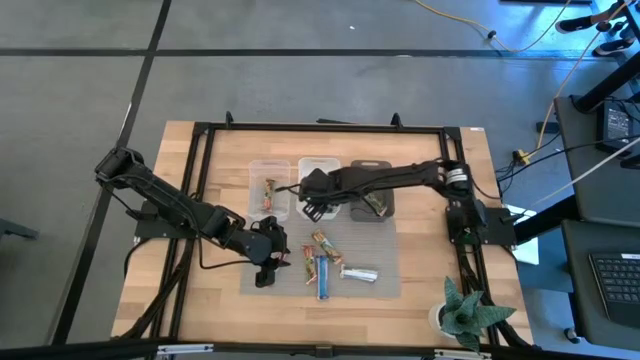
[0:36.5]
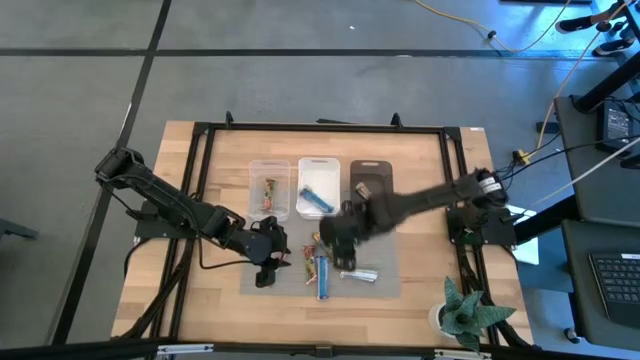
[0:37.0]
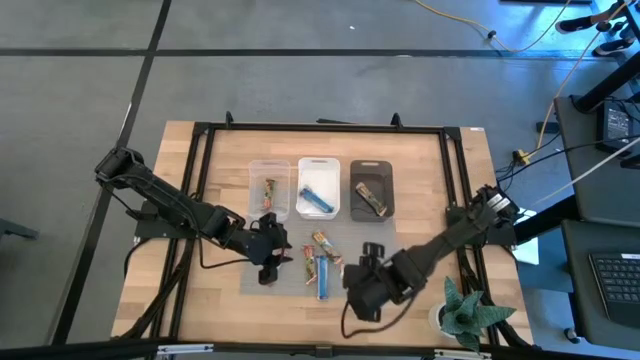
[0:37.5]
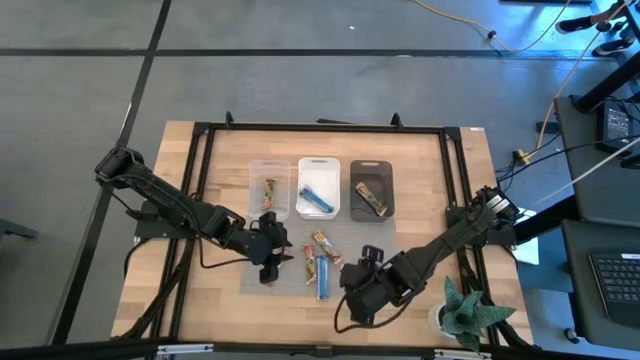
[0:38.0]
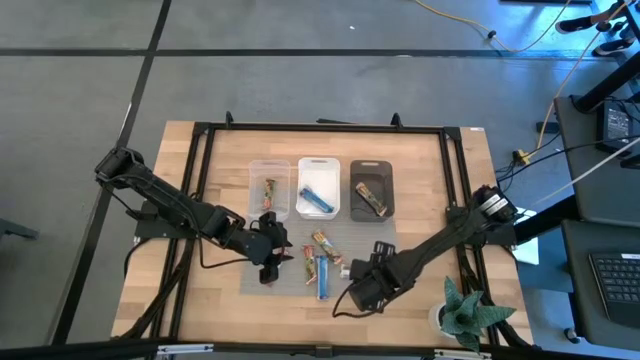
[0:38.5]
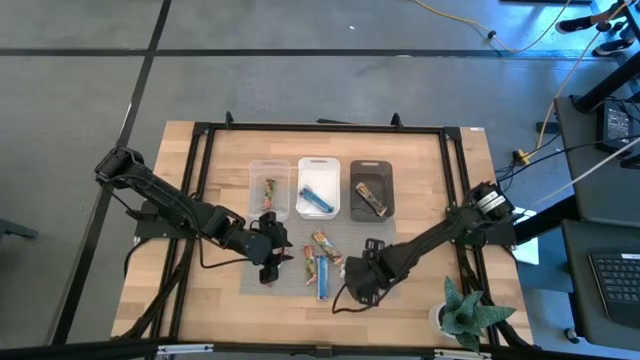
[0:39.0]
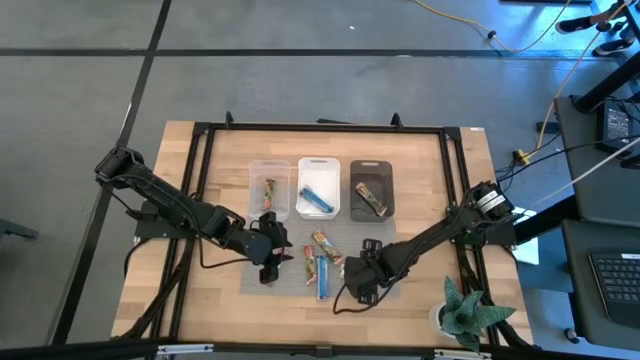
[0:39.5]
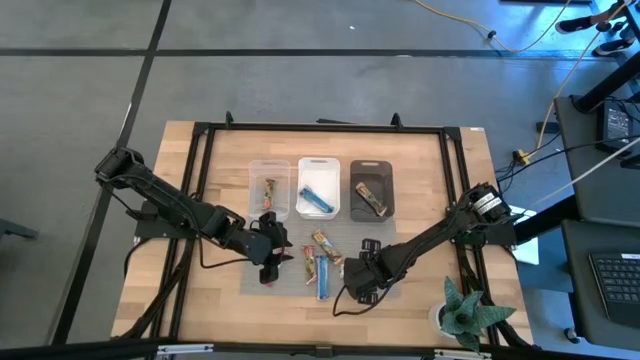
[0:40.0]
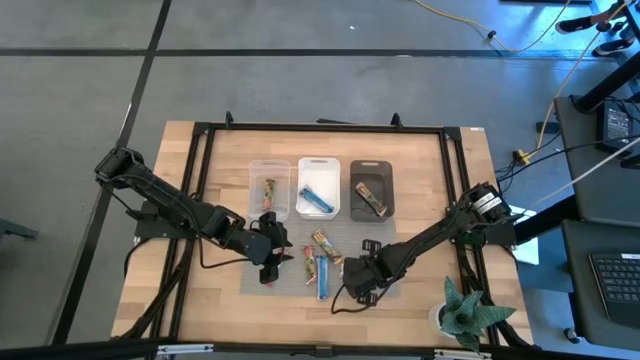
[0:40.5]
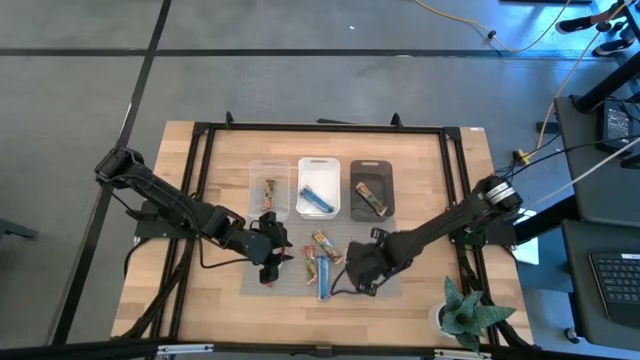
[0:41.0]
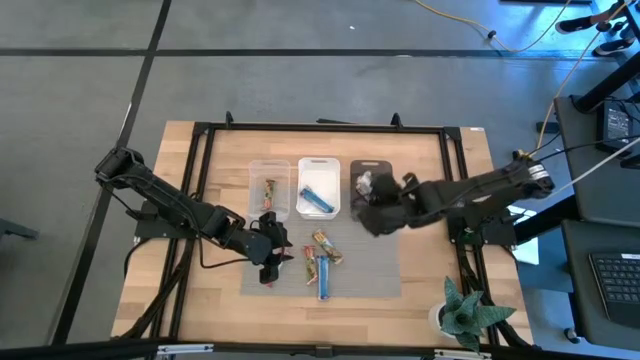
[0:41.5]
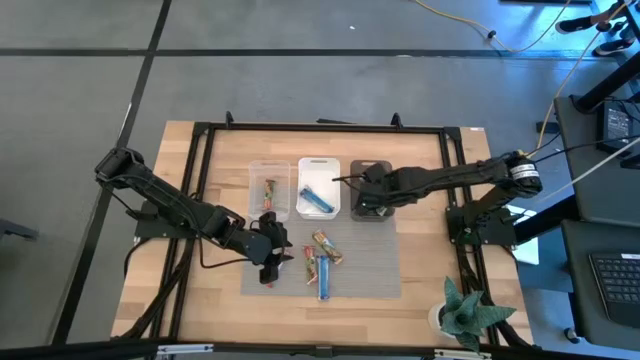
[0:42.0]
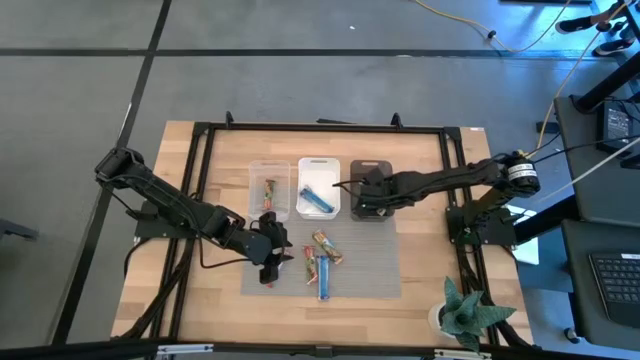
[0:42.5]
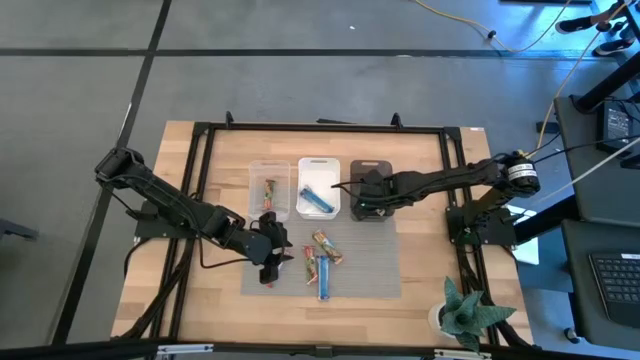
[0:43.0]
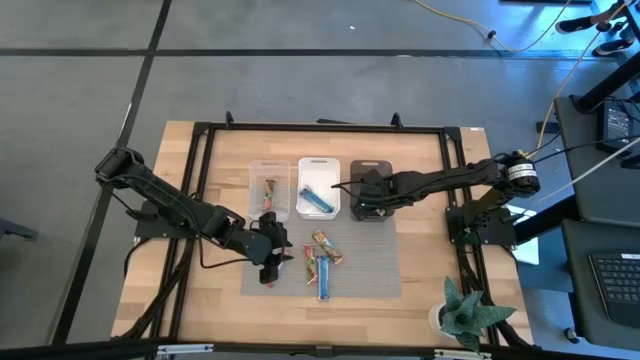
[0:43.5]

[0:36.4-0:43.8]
Task: Pick and place Granola Bars by type
Put the bottom yellow granola bar into the black bin

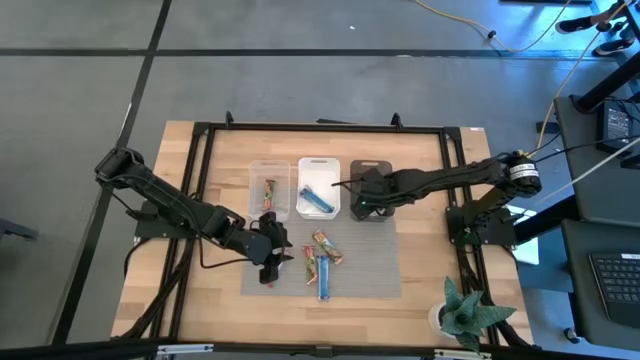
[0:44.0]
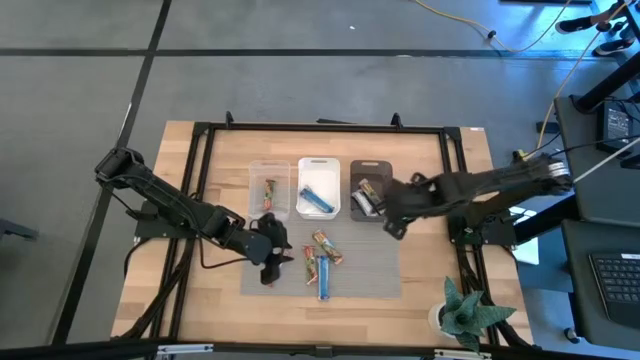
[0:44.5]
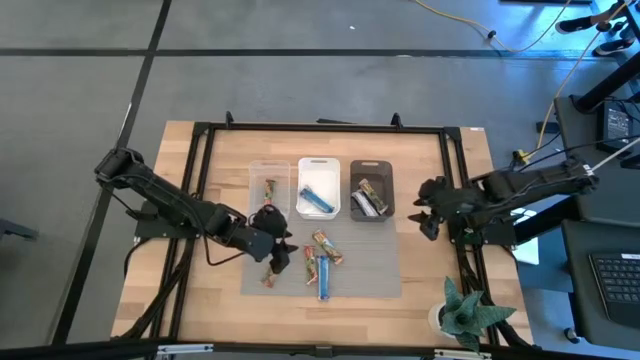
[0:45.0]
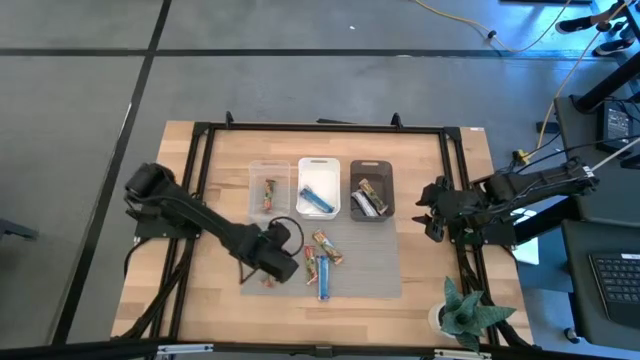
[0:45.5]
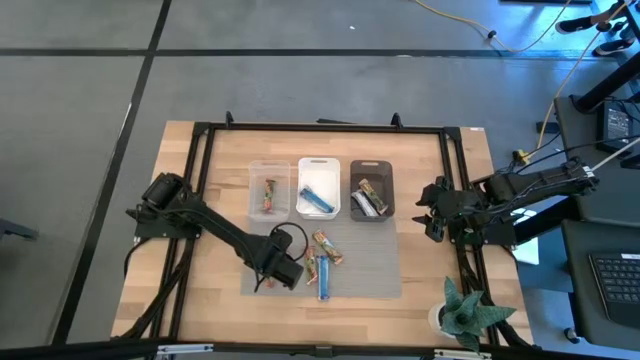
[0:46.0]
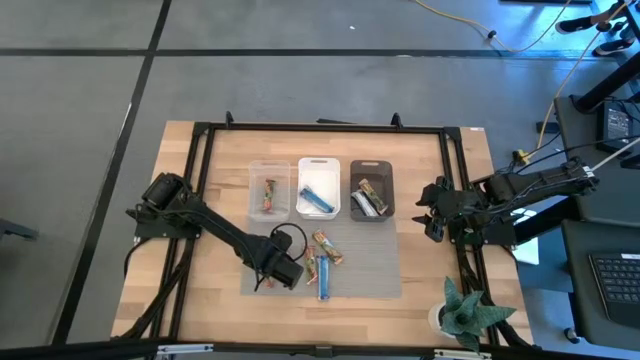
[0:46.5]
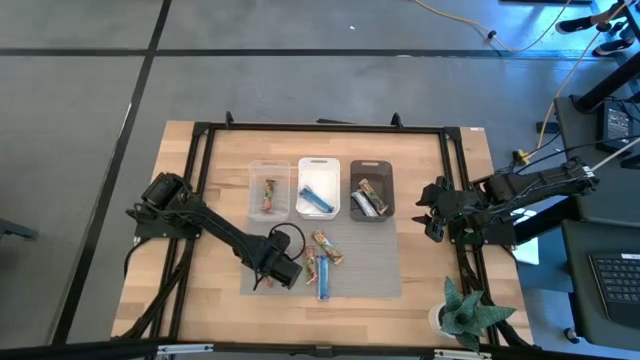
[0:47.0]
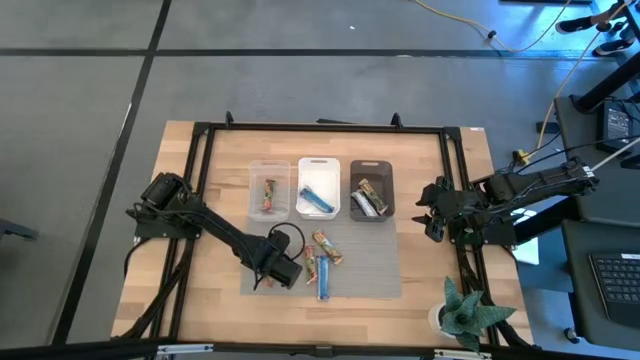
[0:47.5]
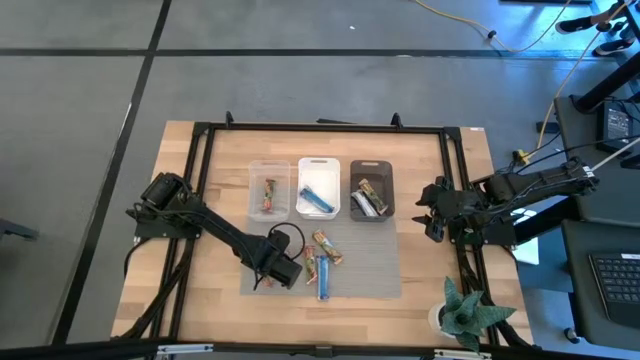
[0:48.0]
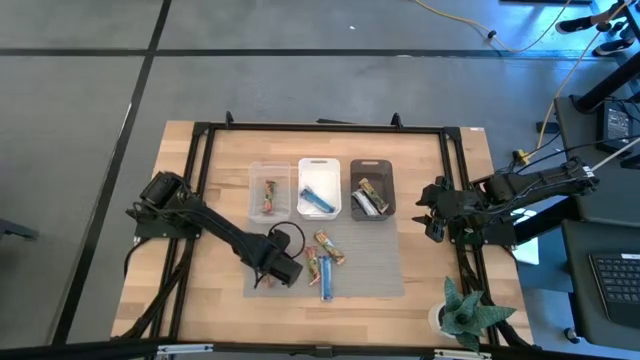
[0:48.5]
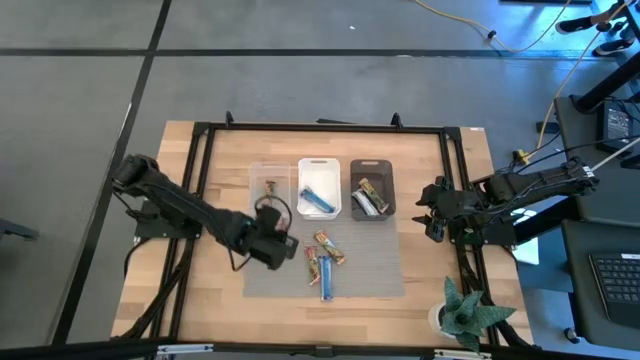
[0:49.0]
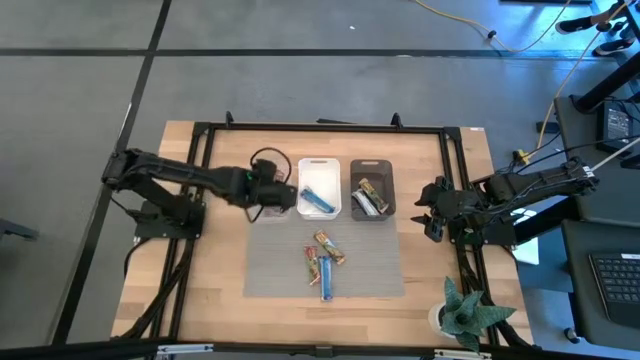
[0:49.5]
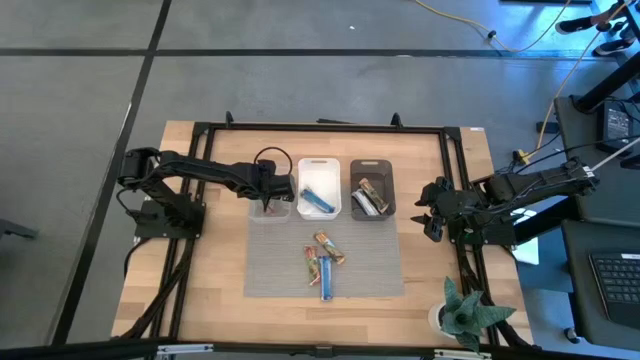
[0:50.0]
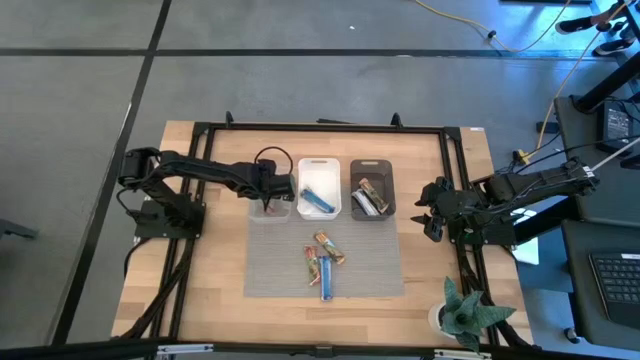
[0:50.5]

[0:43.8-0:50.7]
Put the left red granola bar into the transparent bin

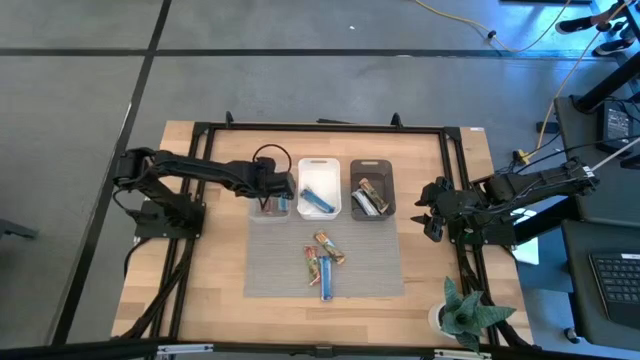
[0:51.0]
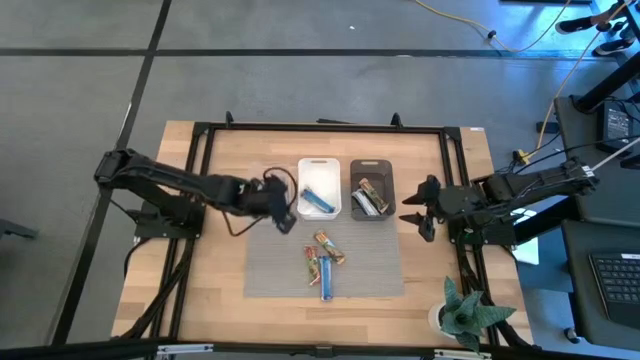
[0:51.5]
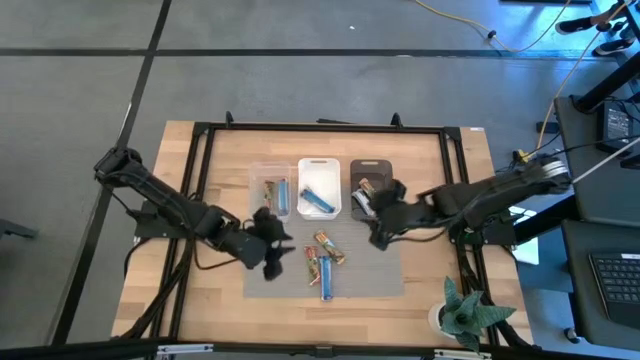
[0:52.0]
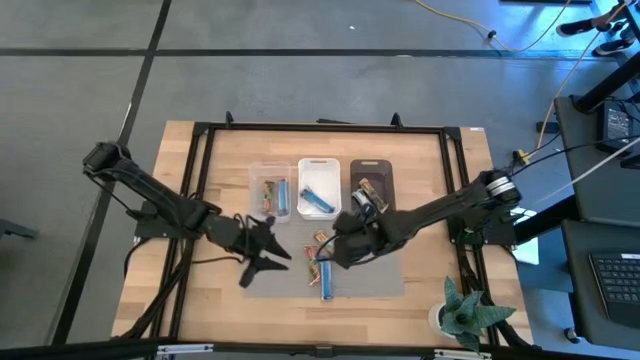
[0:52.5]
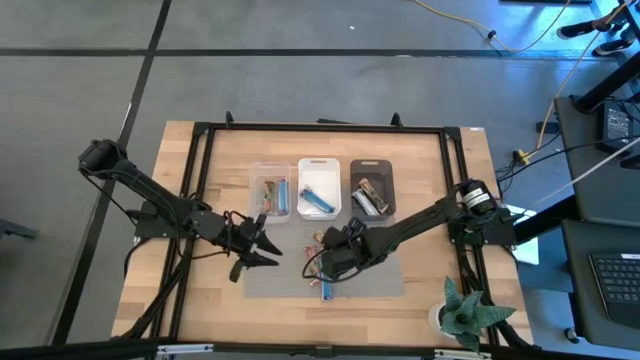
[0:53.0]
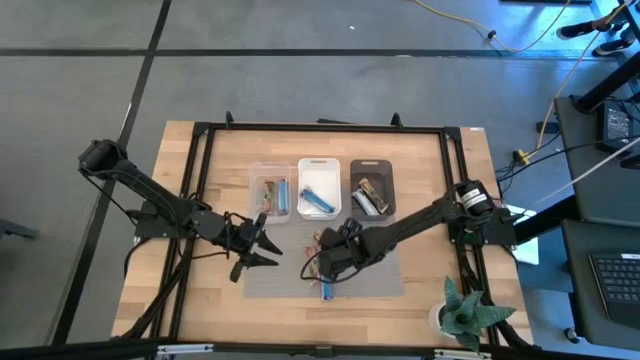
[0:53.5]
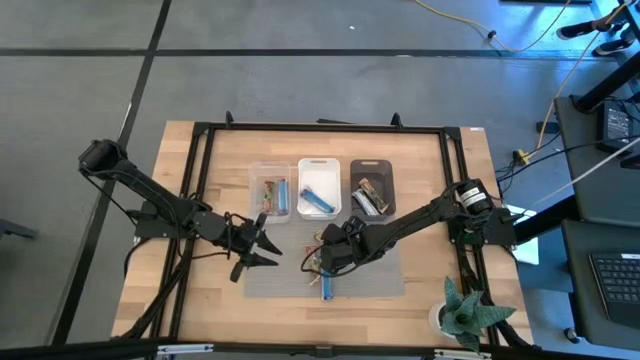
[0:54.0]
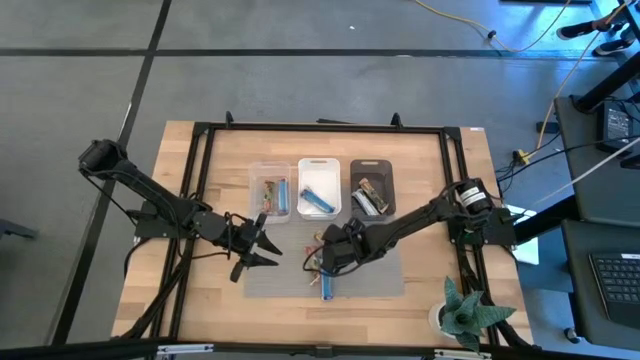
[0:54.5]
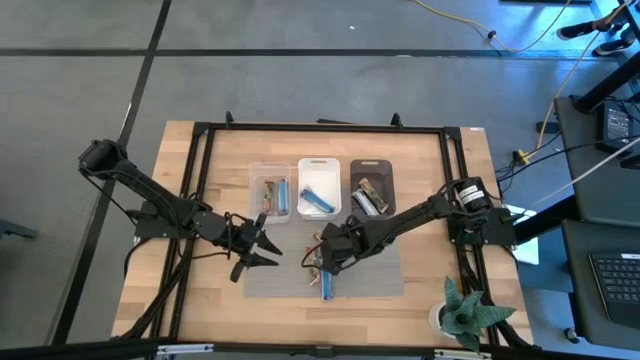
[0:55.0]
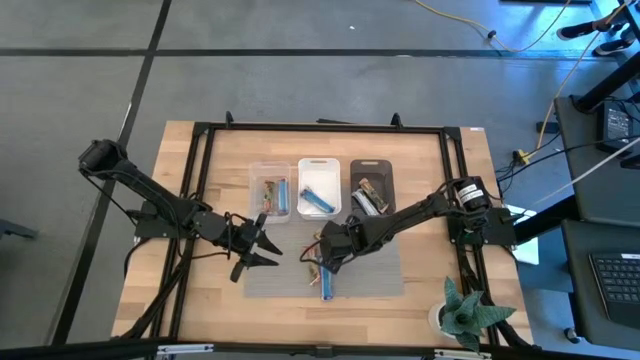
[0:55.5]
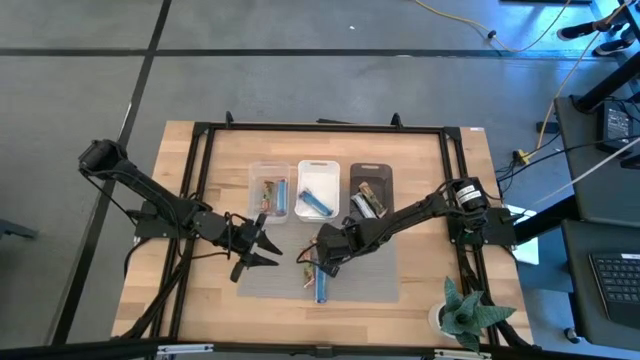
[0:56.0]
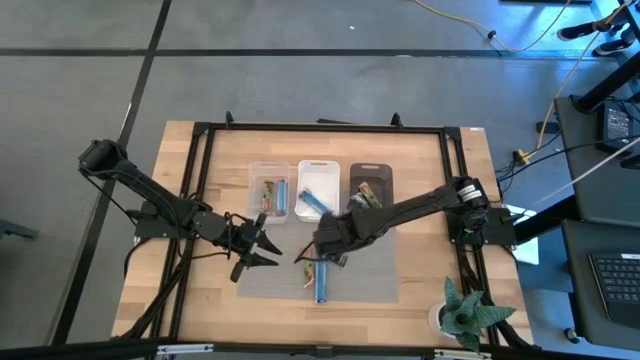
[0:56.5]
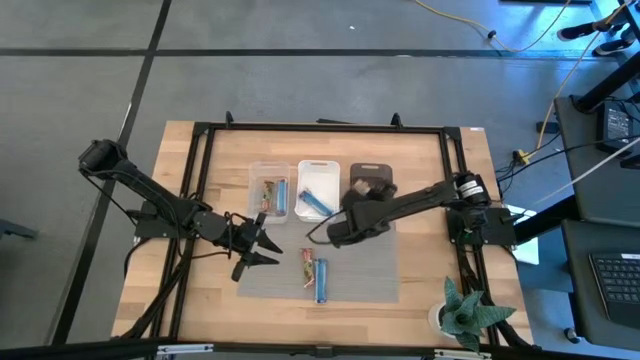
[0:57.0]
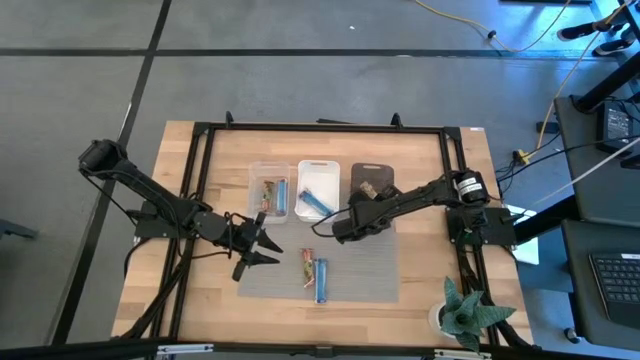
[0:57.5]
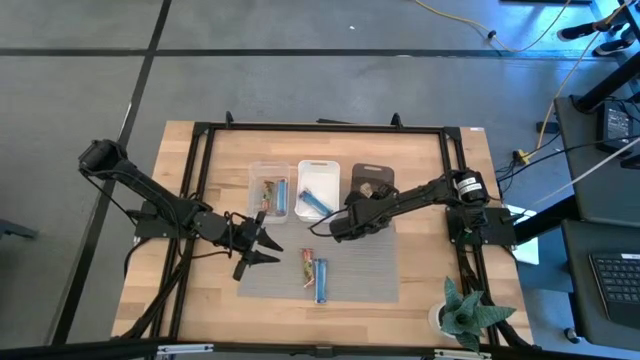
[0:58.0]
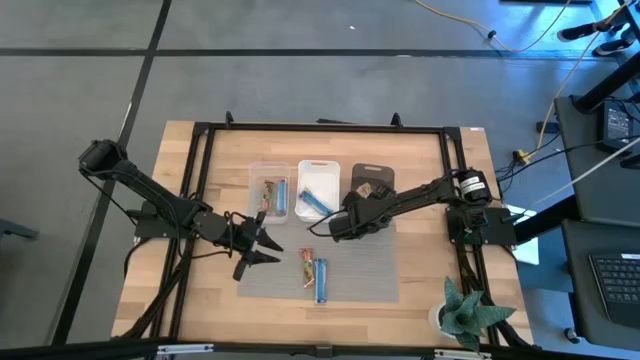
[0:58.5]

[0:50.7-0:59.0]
Put the yellow granola bar into the black bin
